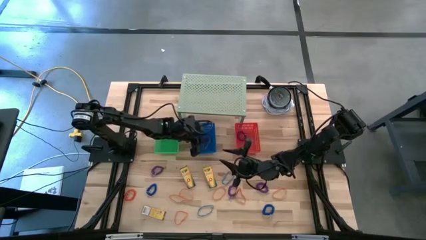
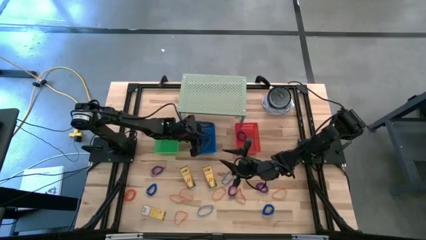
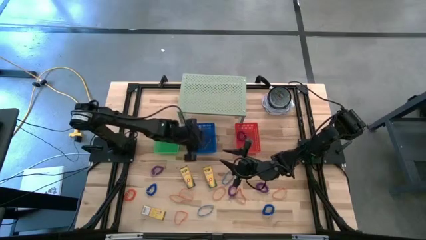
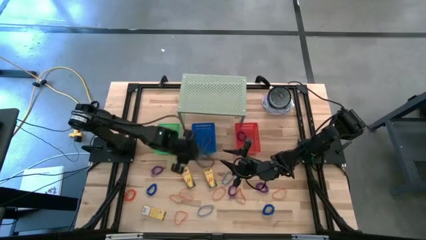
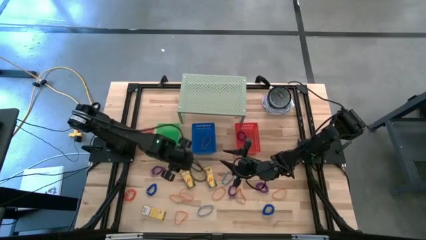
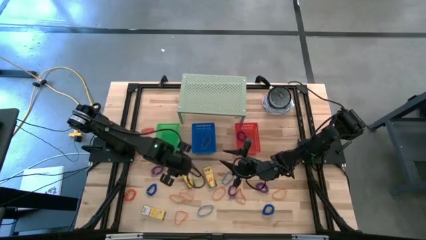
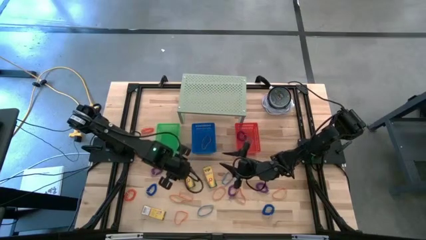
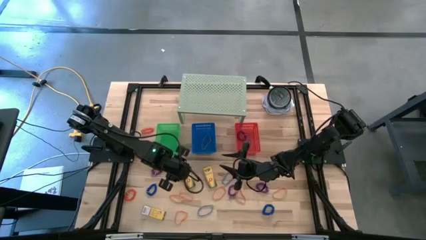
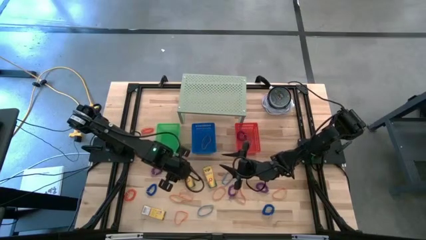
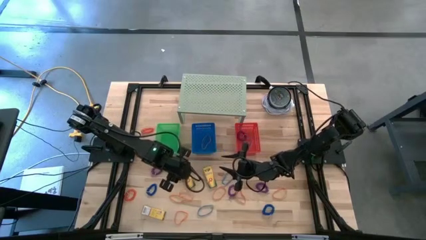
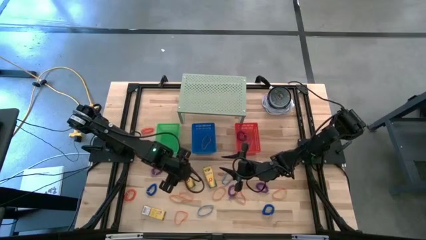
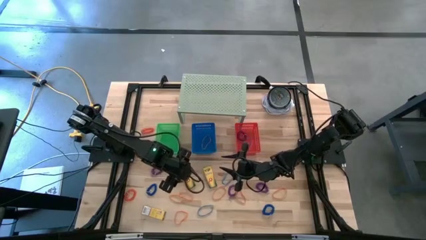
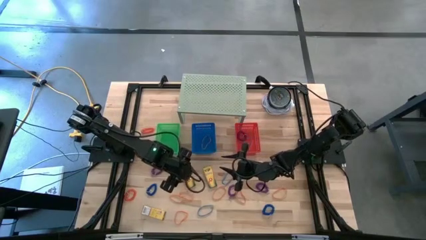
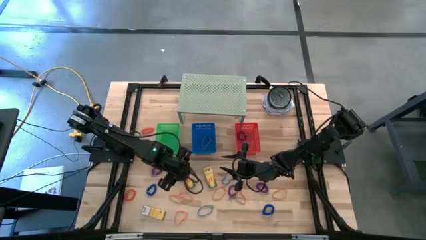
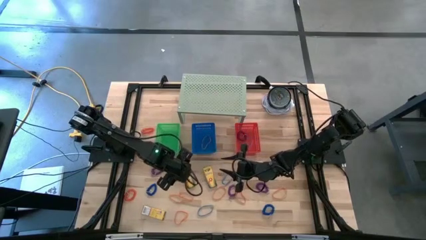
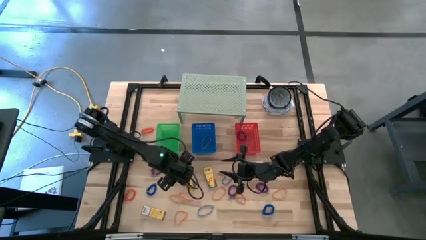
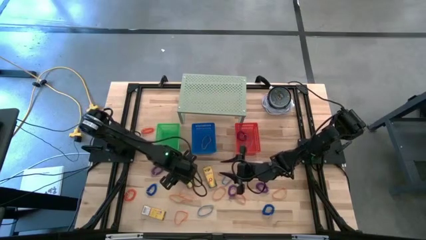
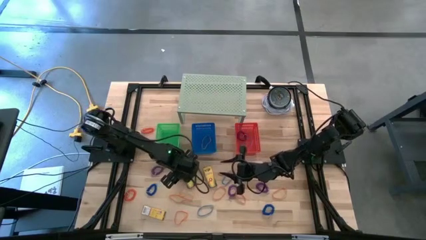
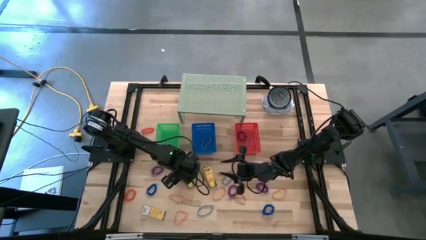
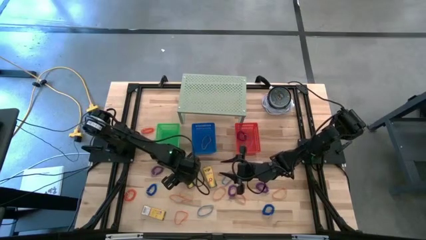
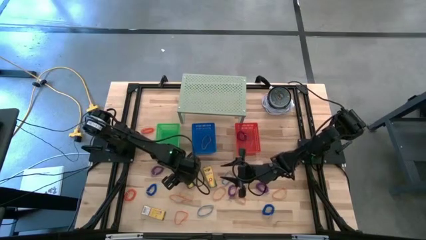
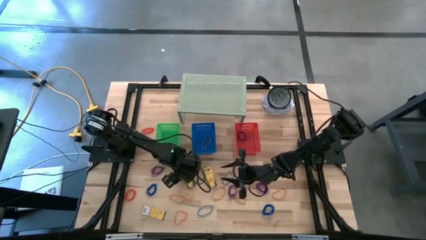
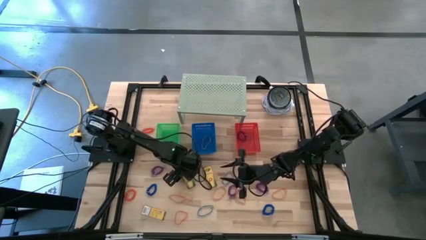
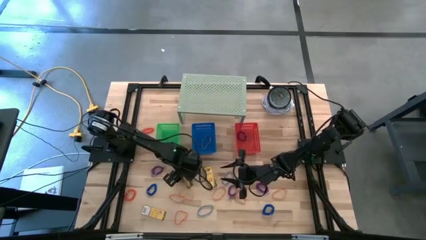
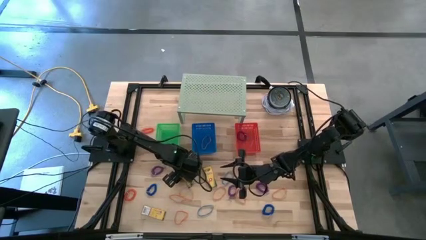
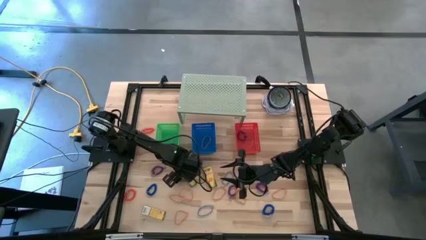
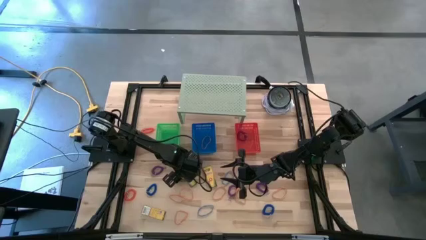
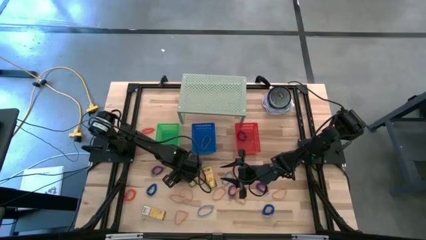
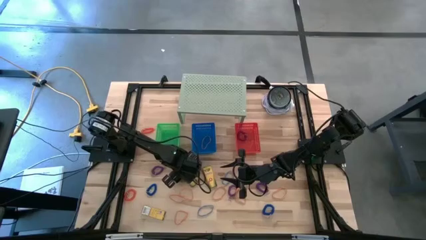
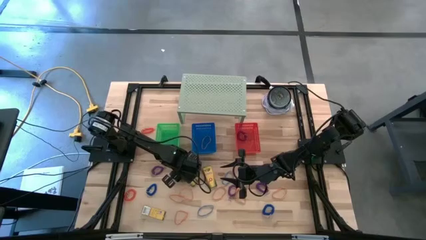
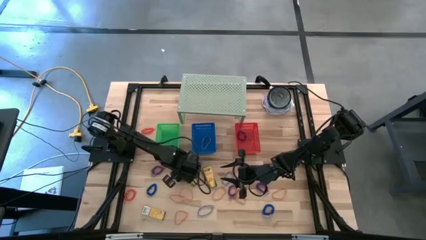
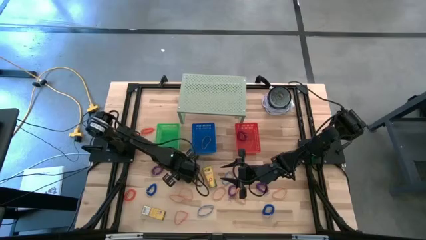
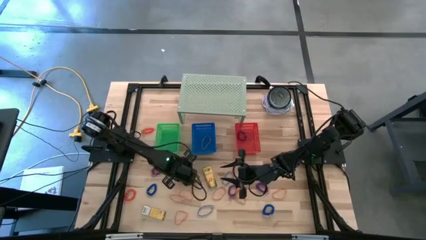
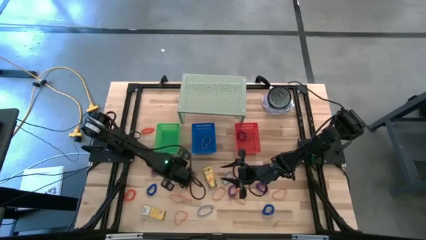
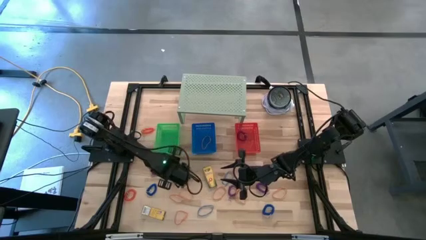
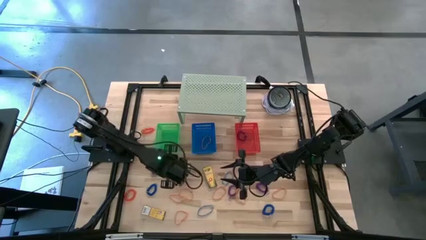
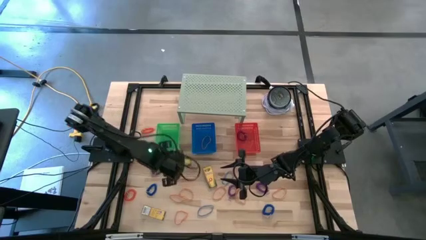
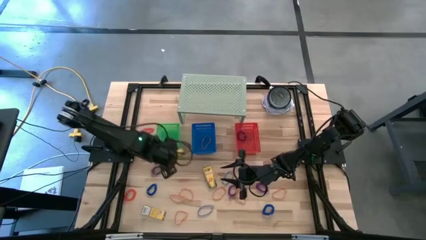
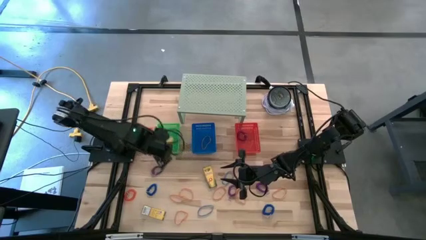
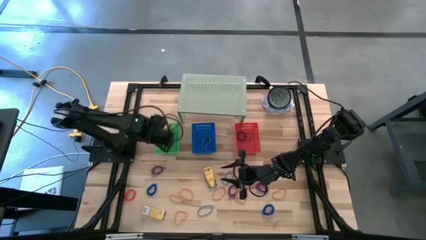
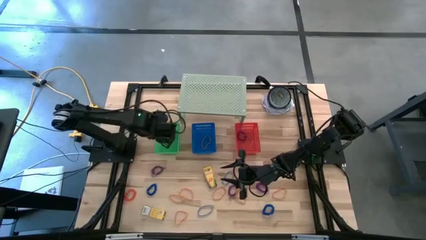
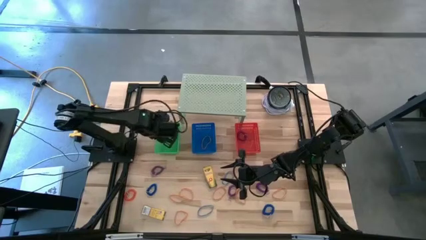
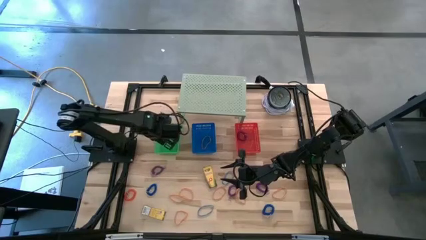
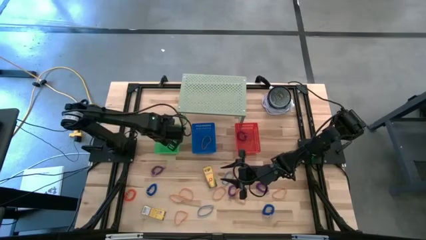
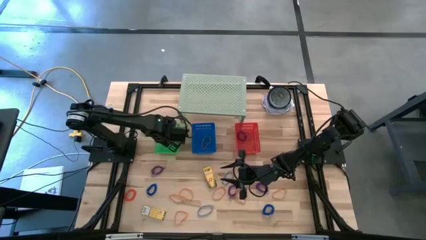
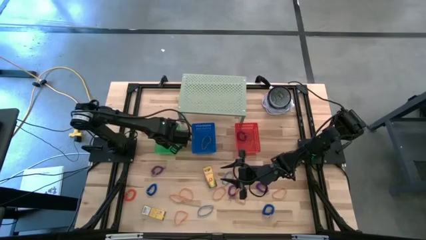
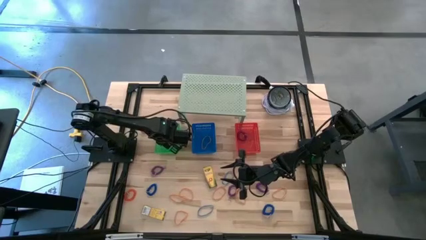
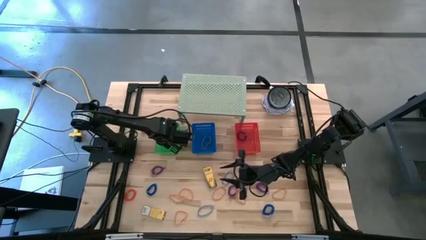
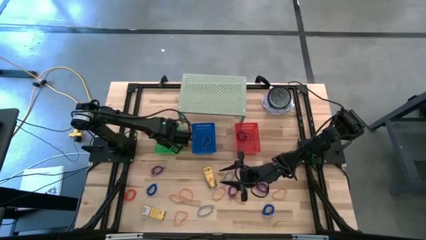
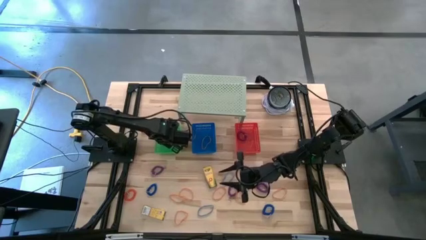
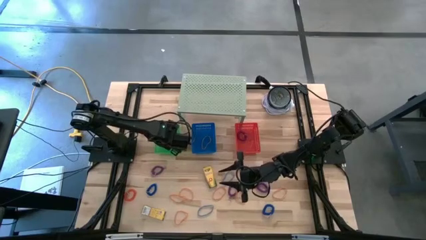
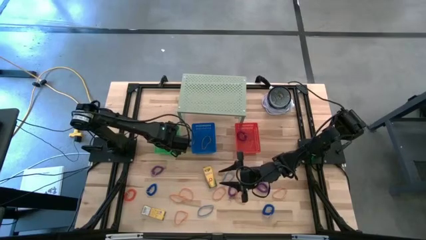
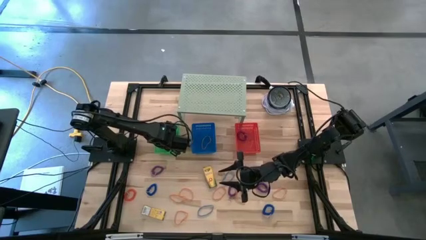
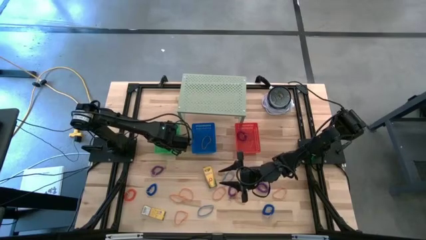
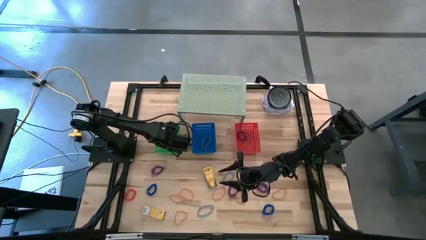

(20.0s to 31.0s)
Task: Pick & Place Office Desk Supplies
Put the crayon box into the green bin

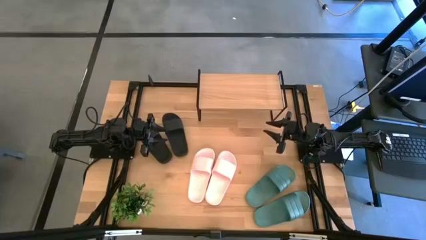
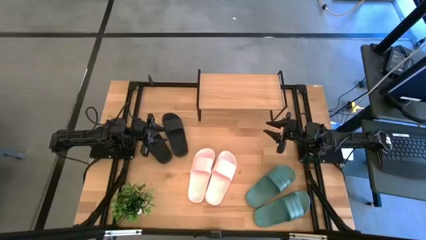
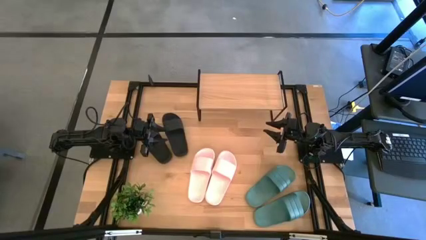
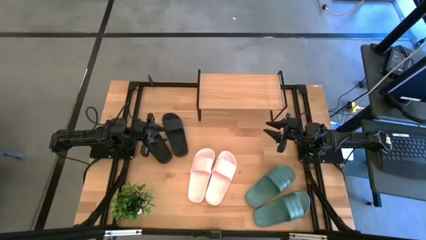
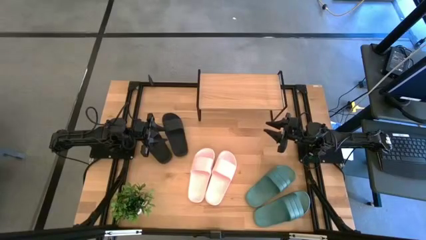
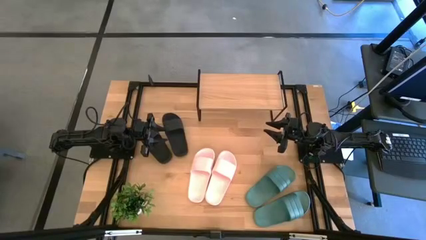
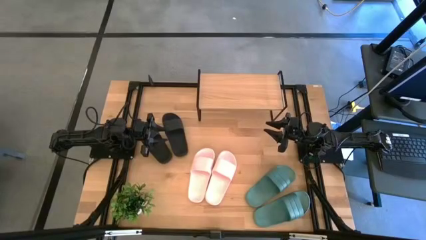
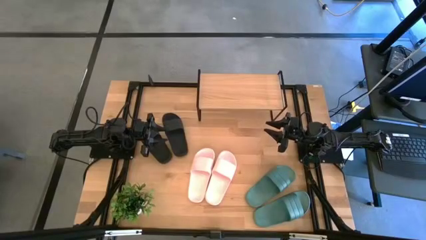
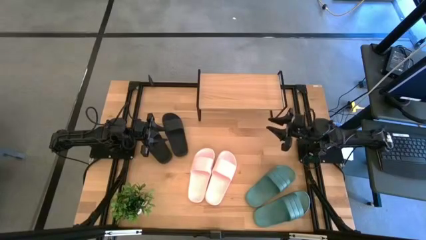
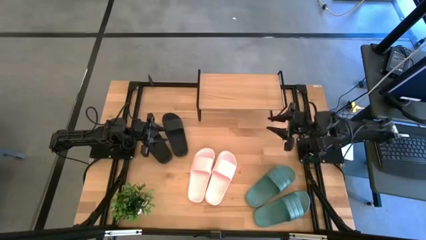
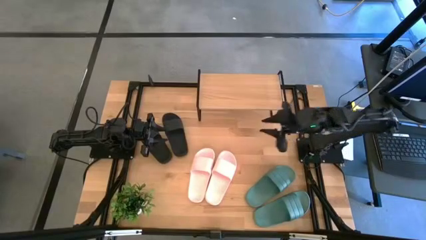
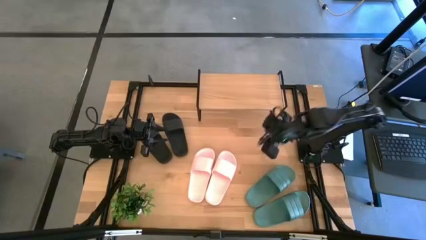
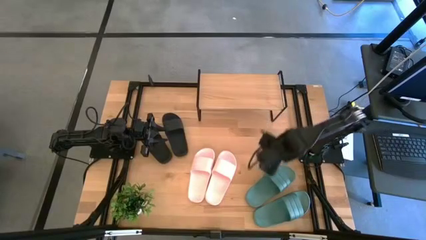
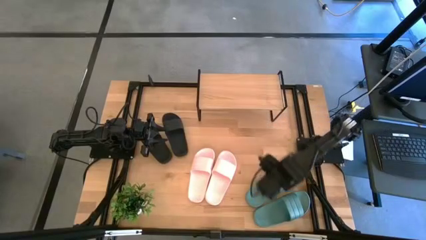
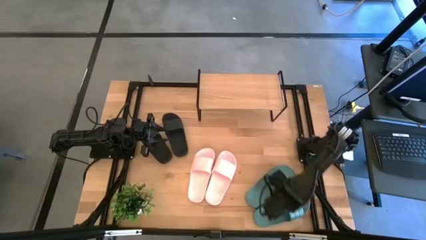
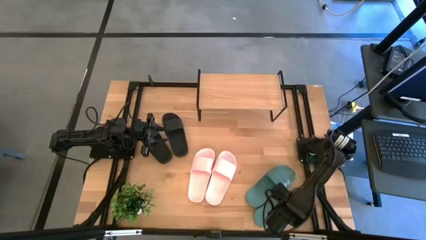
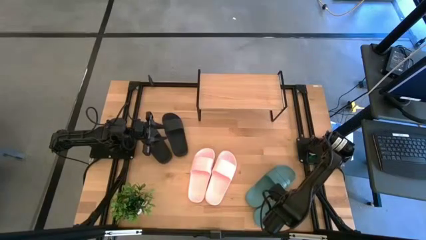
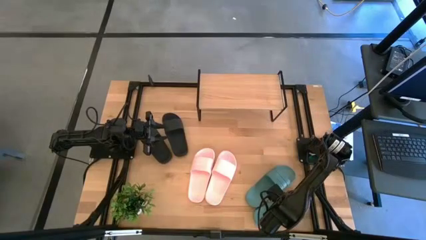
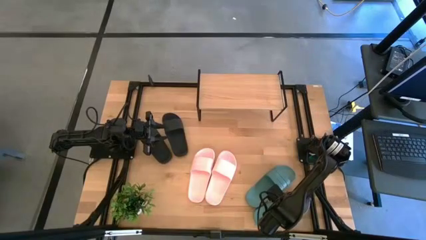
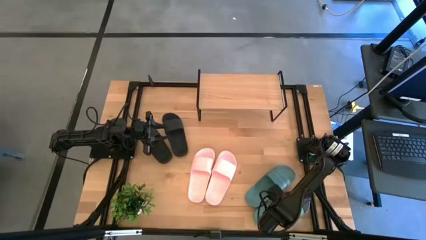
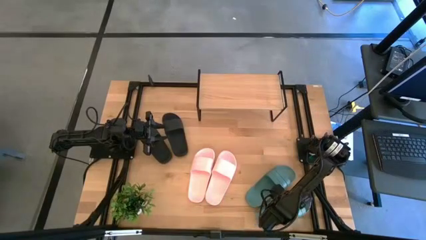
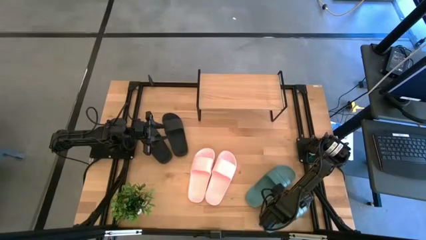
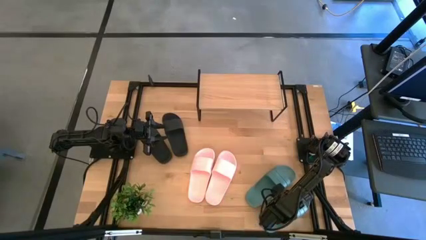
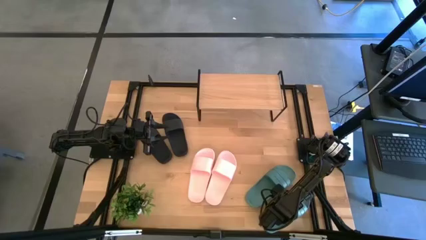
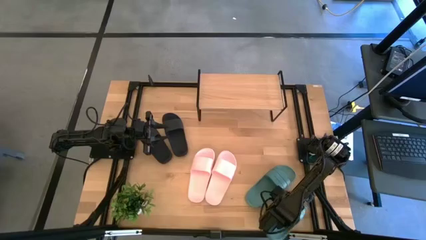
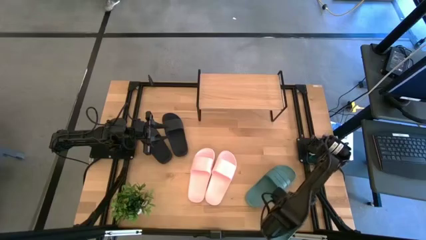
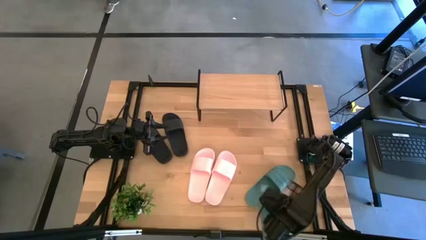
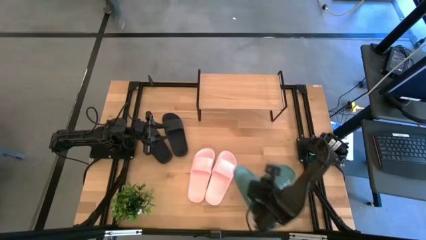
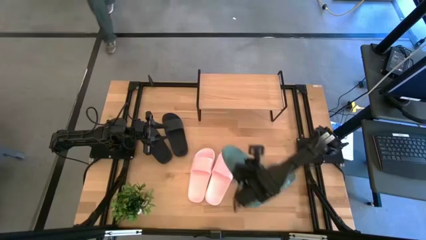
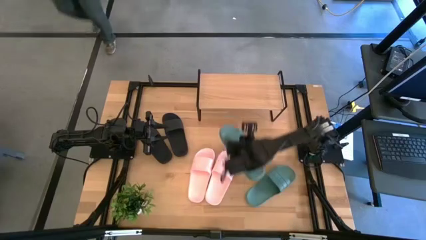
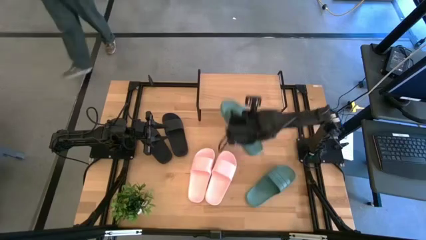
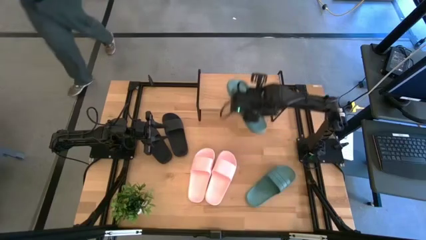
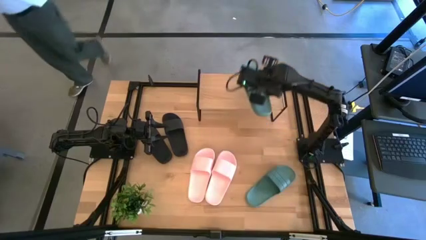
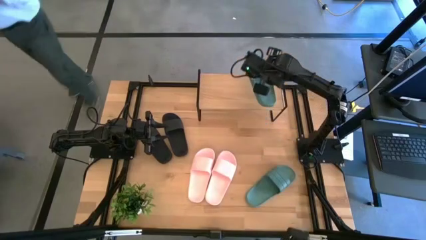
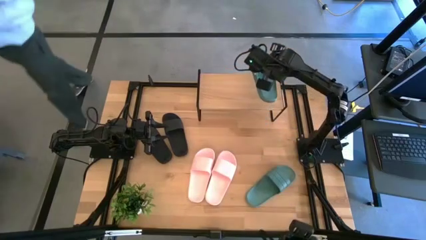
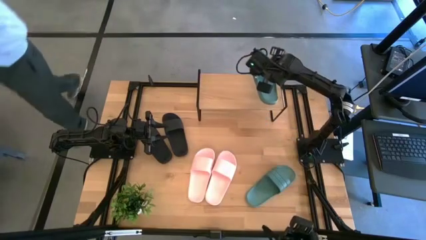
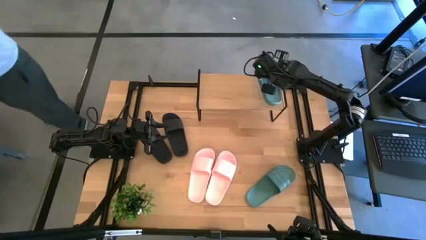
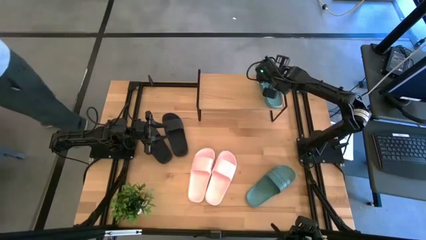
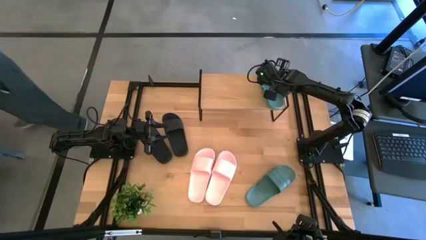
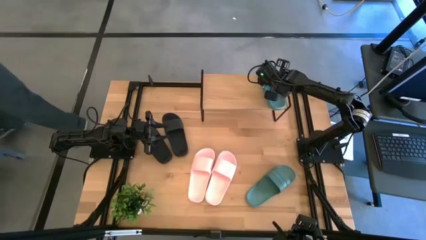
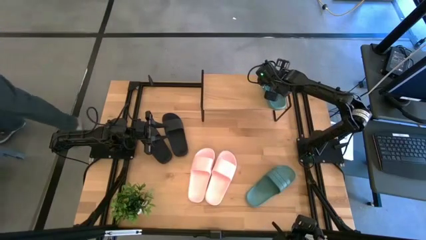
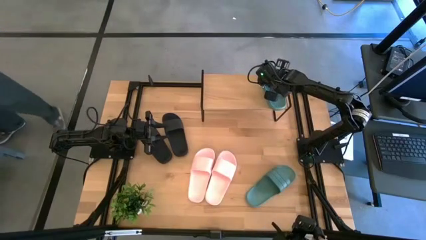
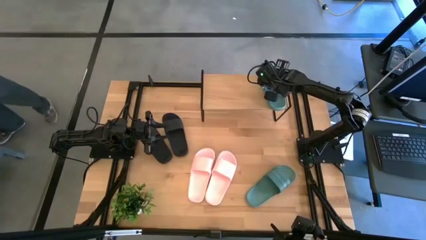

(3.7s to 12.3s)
Task: Pick and place slides into the shelf
Put the right green slide on the shelf
